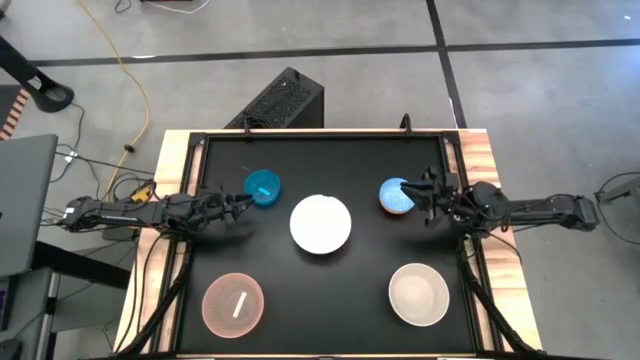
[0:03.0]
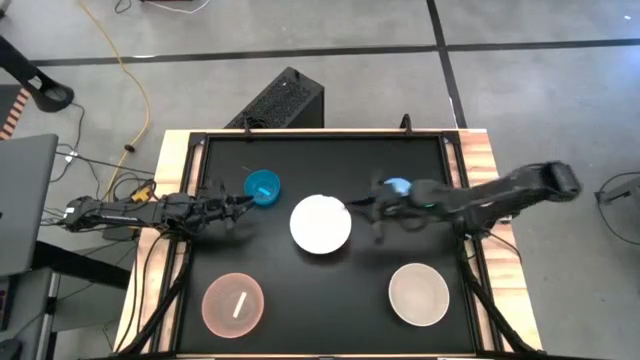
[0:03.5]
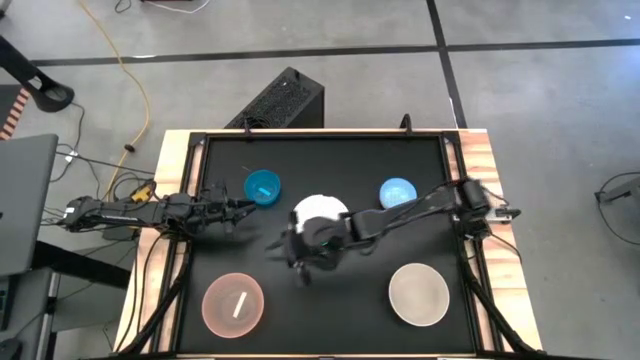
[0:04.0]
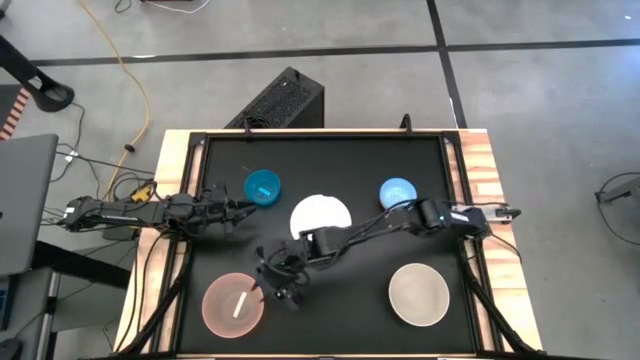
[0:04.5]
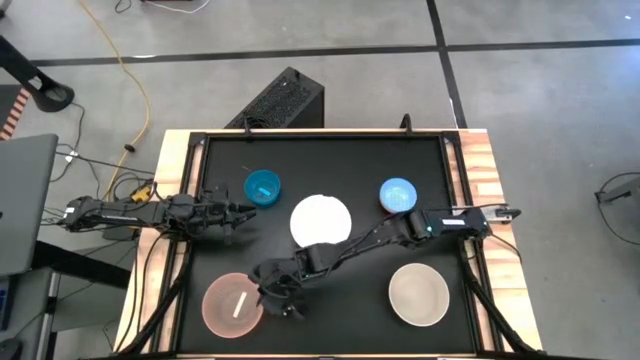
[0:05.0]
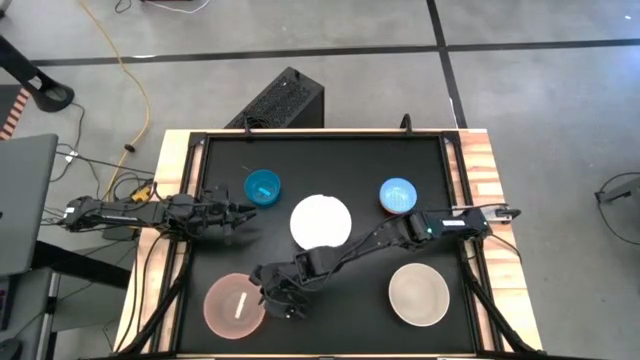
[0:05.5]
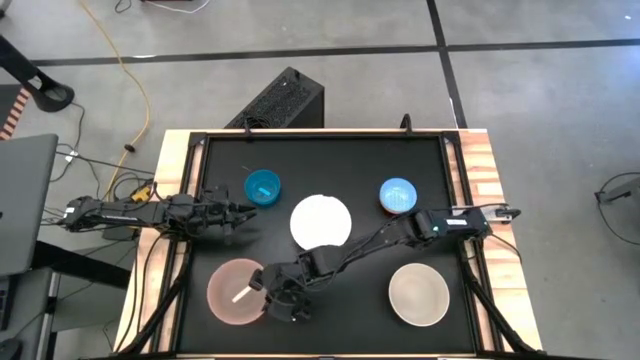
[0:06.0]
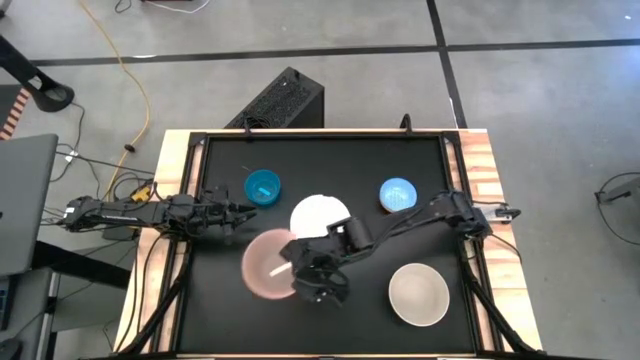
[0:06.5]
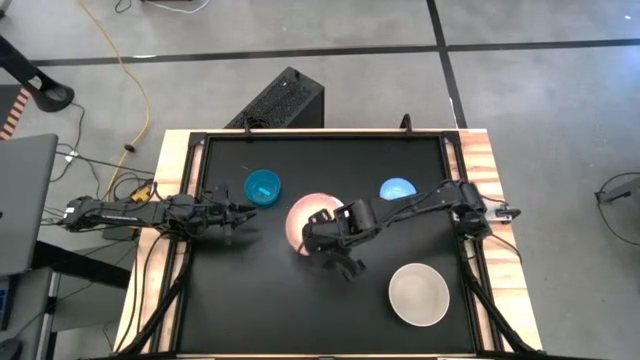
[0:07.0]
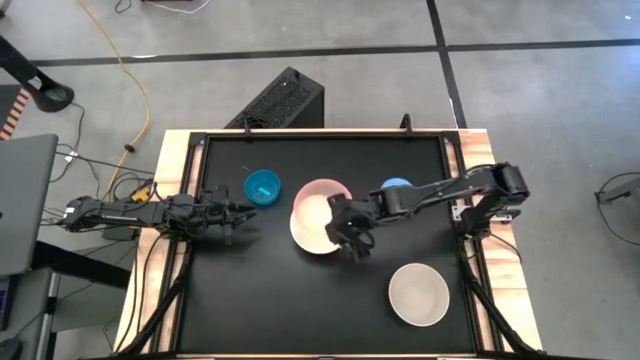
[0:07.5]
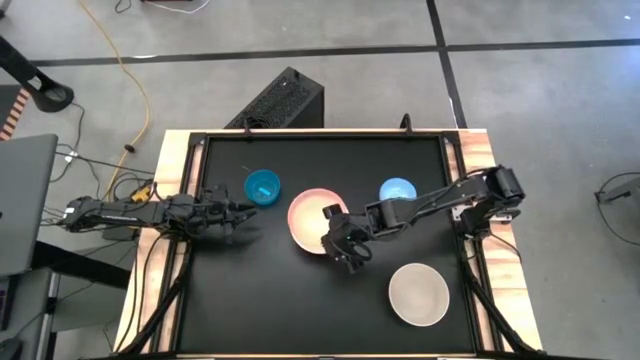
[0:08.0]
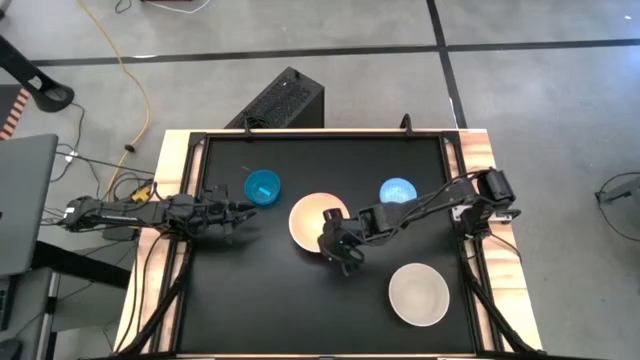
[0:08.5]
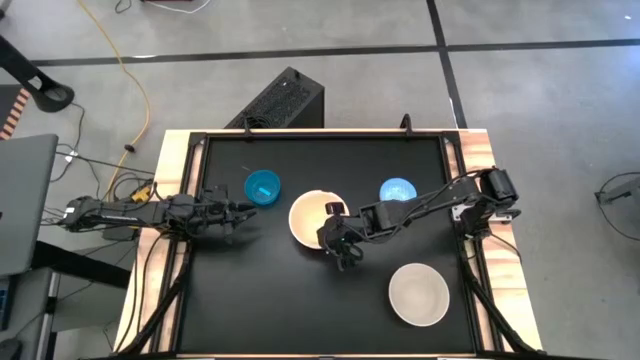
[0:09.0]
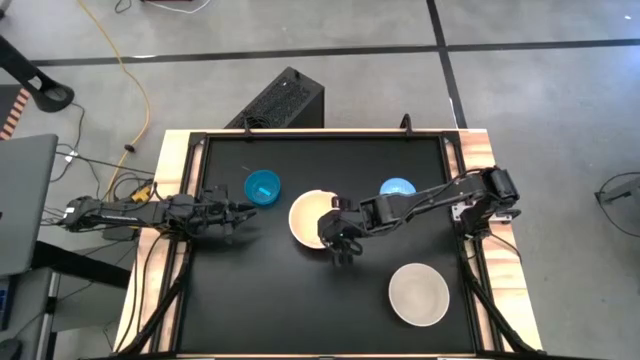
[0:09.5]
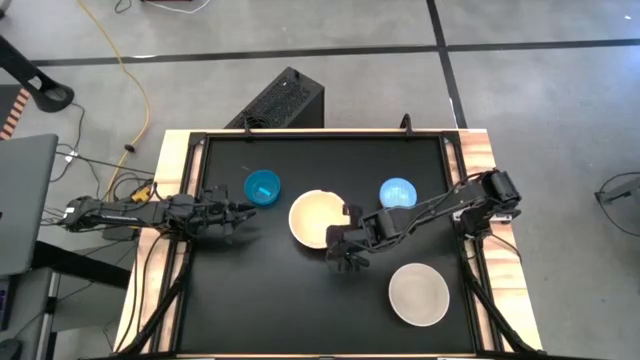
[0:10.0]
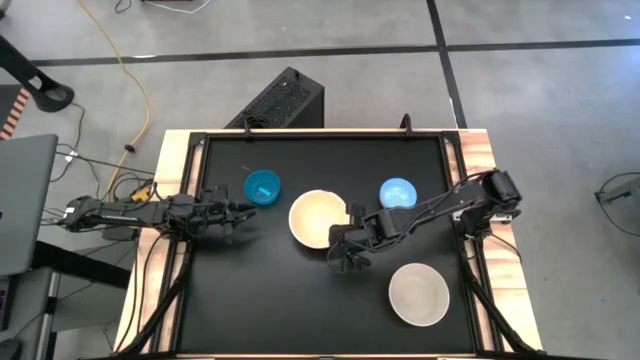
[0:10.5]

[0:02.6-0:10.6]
Stack the pink bowl on top of the white bowl

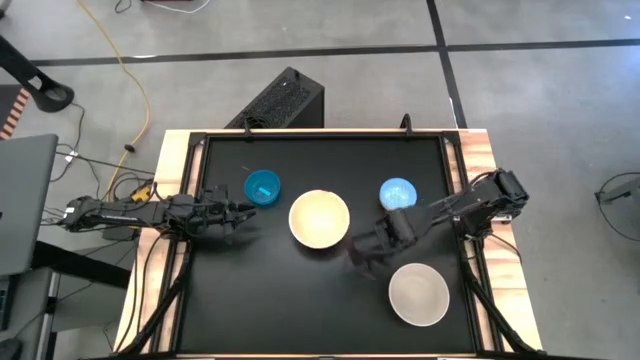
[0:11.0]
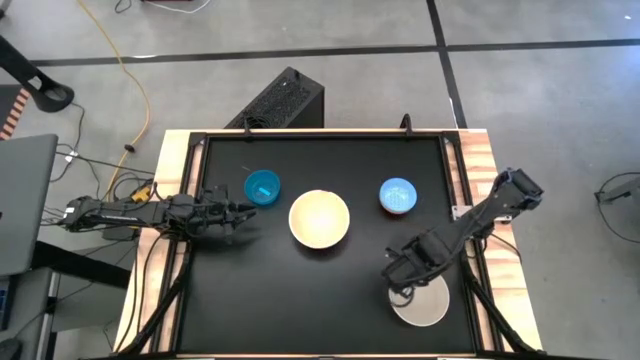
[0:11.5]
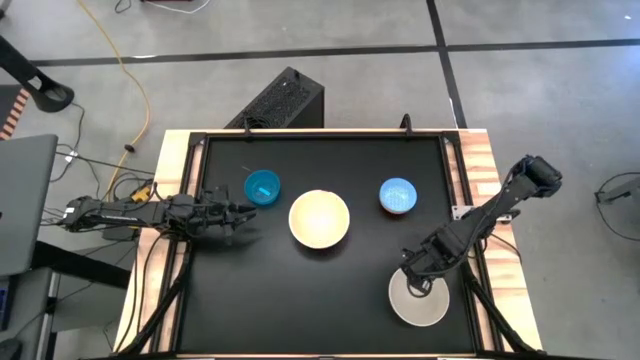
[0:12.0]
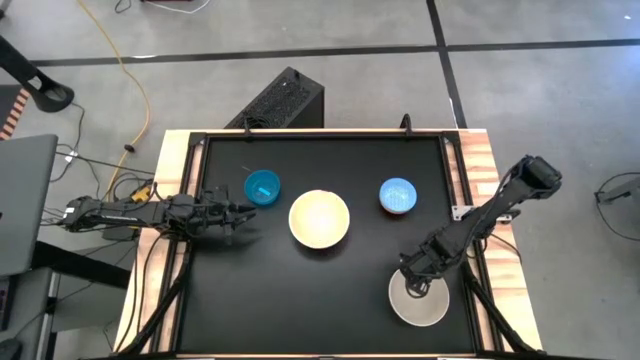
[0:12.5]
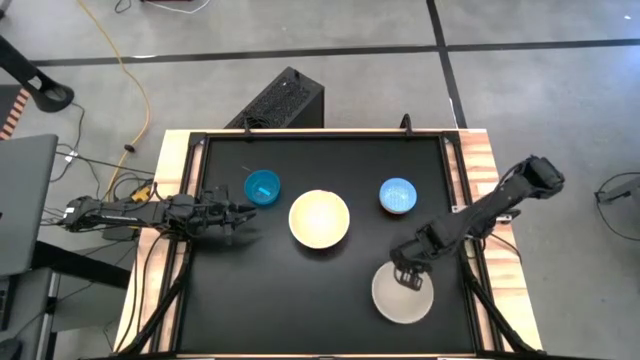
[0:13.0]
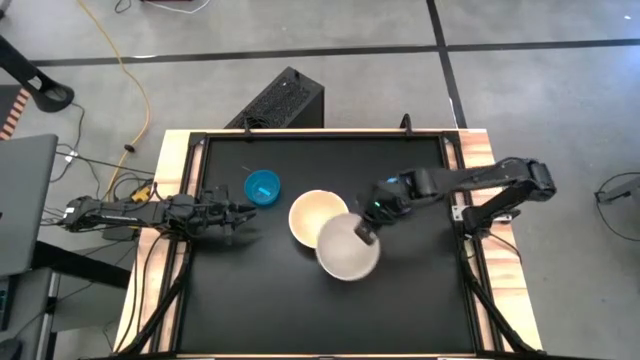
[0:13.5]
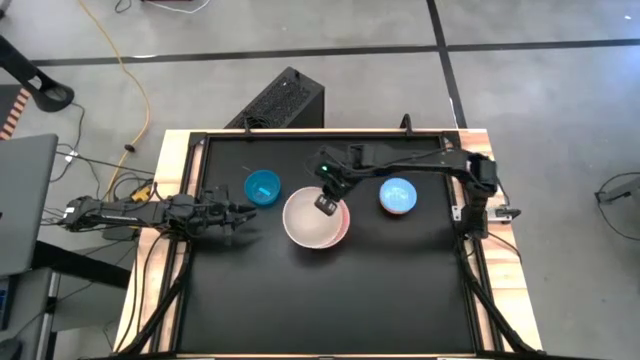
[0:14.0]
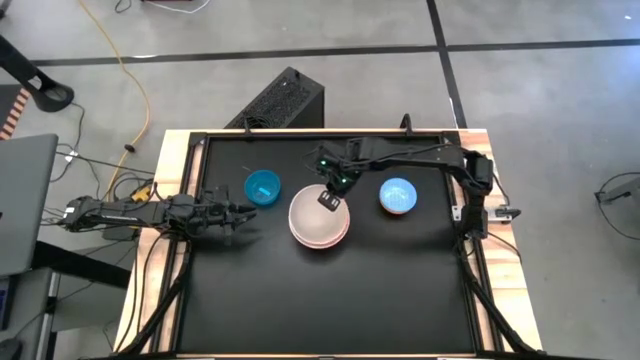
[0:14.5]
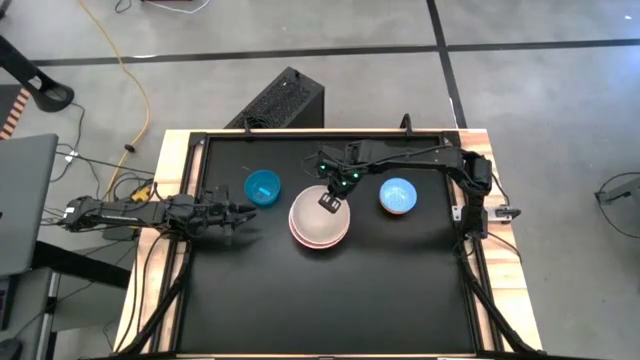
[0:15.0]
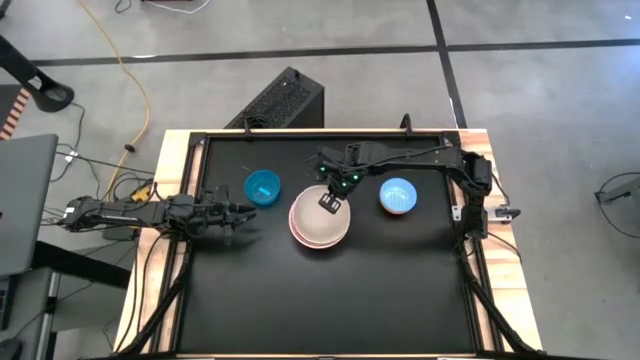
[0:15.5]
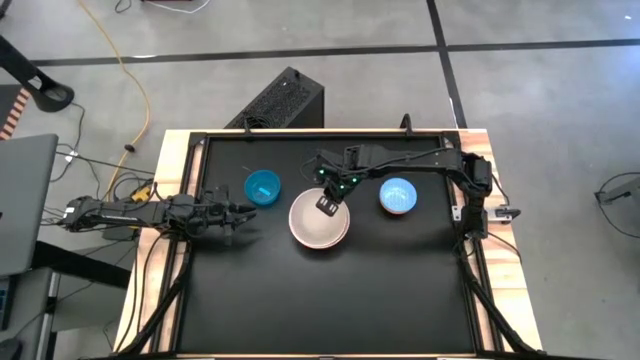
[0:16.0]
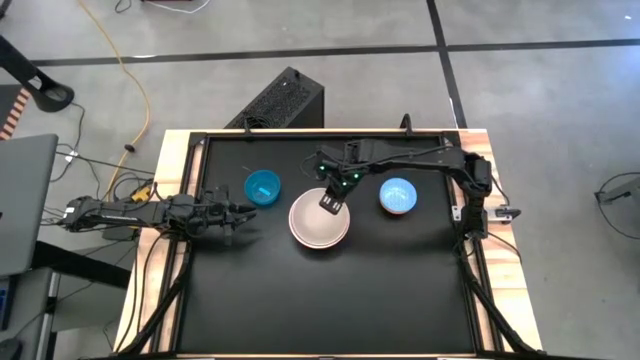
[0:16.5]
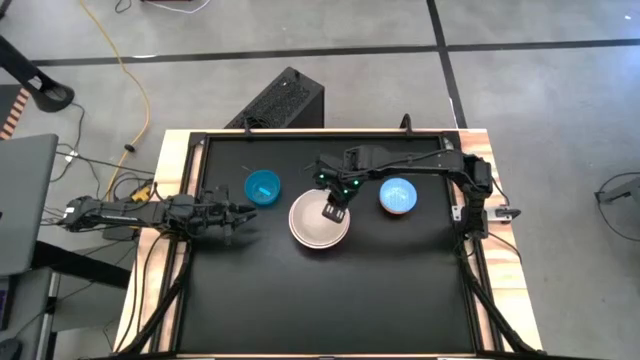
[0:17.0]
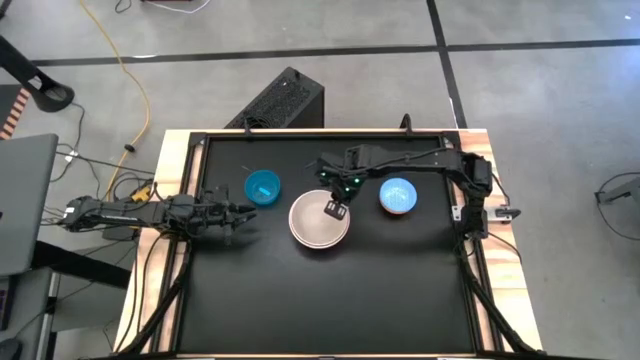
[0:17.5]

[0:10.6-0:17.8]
Stack the gray bowl on top of the pink bowl

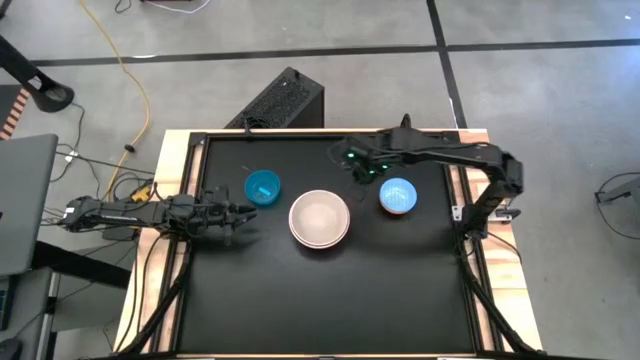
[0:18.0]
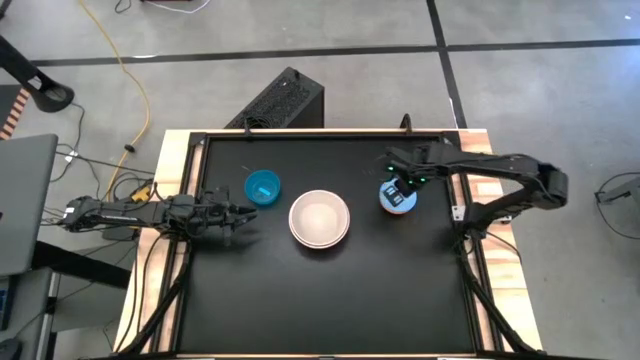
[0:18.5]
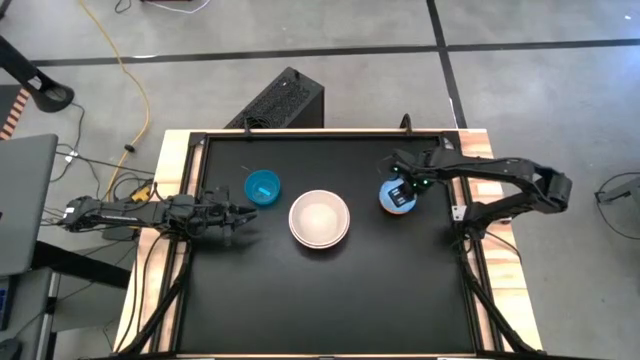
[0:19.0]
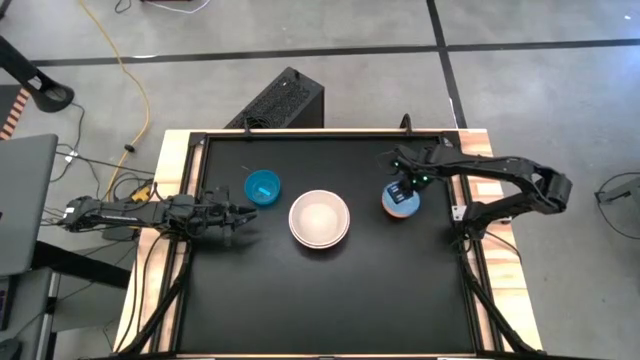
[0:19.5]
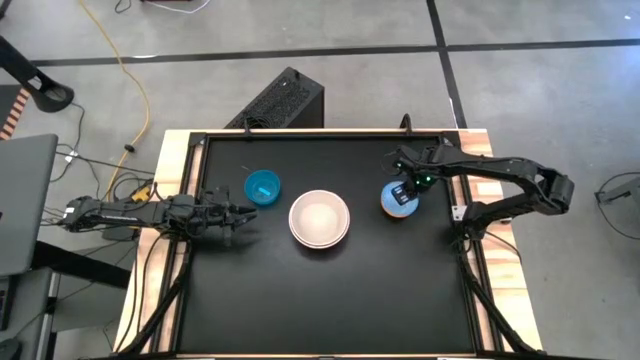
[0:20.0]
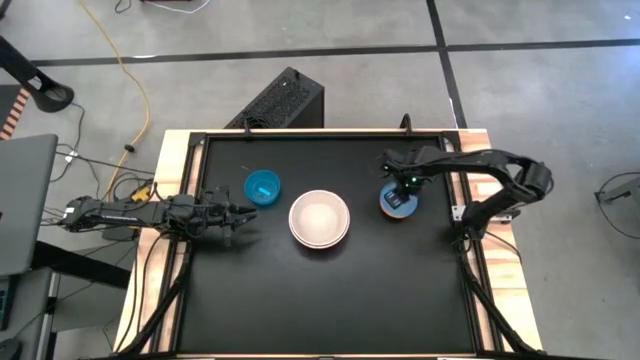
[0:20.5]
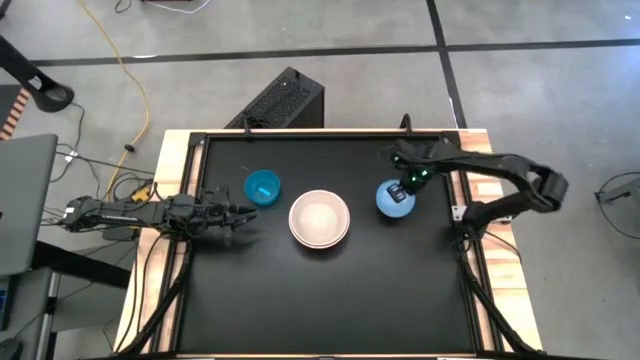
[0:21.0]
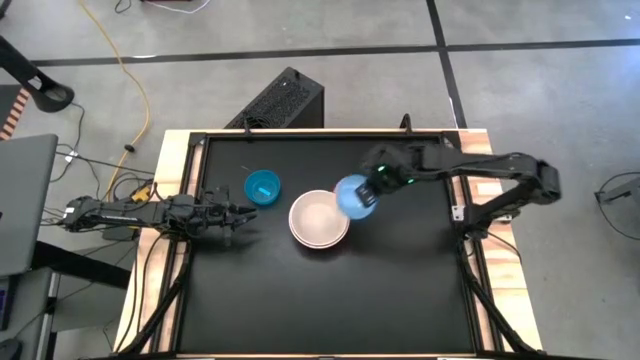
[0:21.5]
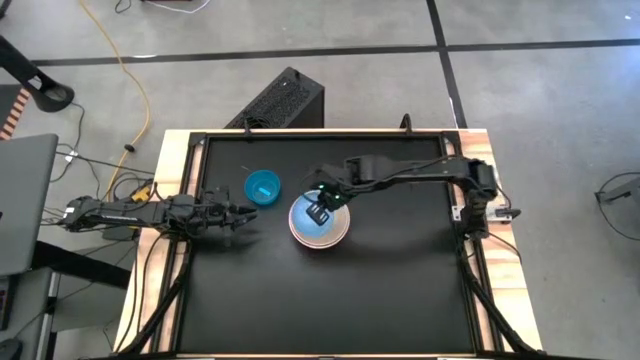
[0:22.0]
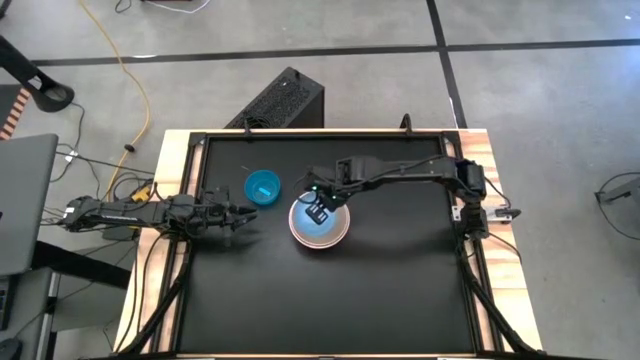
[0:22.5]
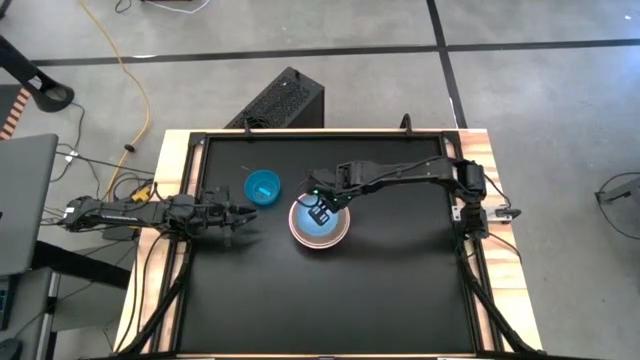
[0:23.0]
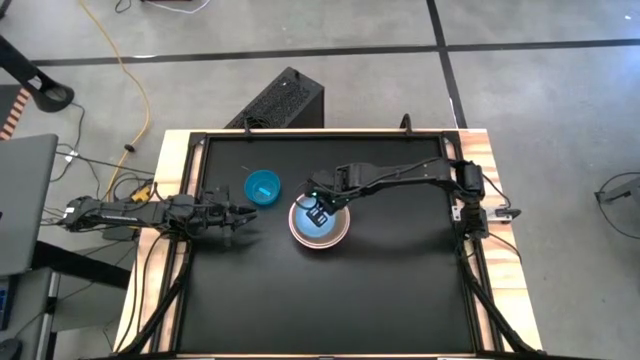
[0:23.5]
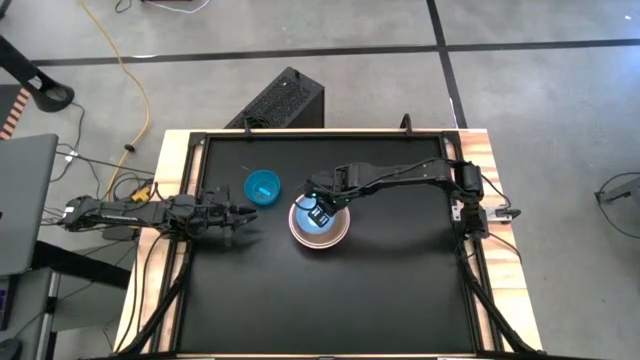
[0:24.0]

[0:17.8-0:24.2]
Stack the blue patterned bowl on top of the gray bowl
